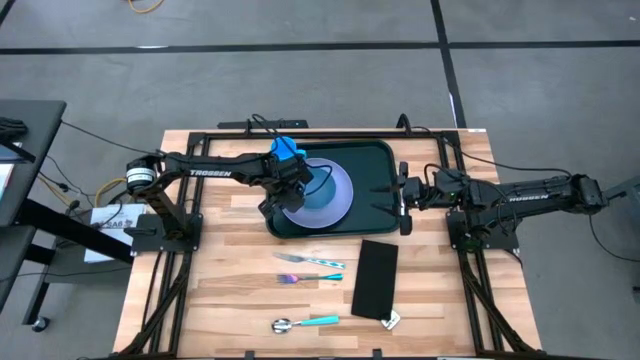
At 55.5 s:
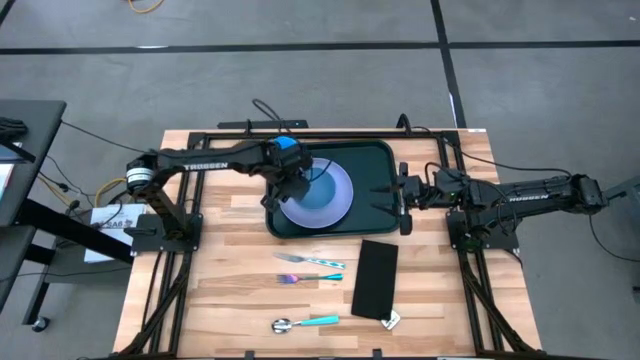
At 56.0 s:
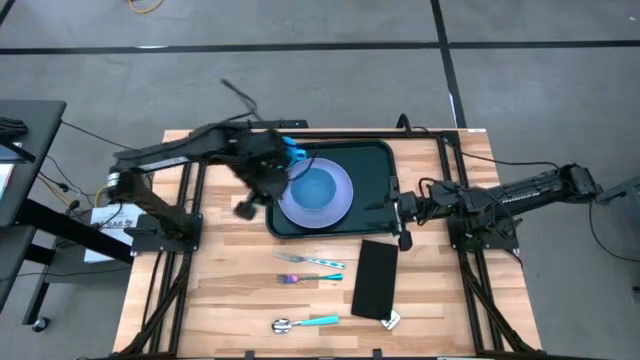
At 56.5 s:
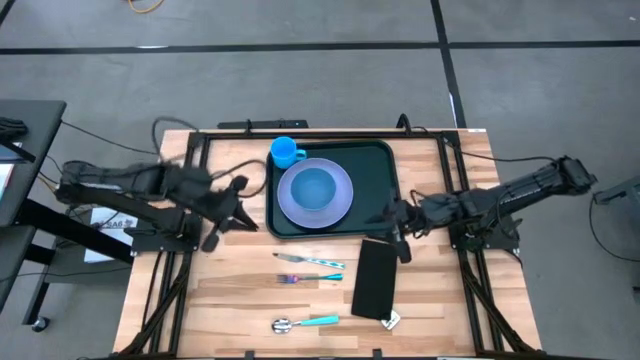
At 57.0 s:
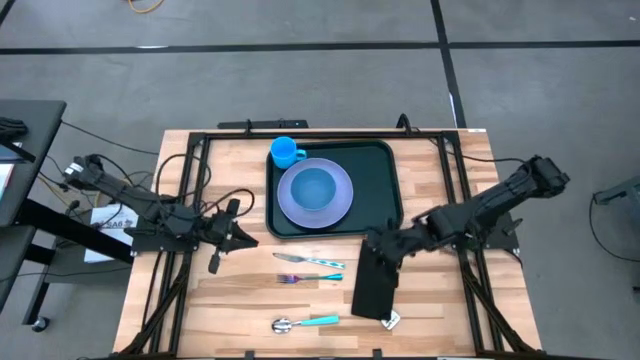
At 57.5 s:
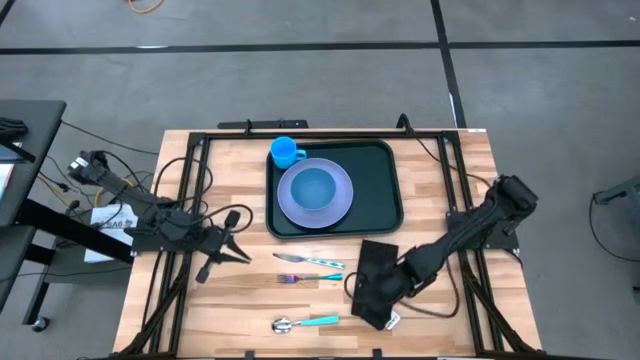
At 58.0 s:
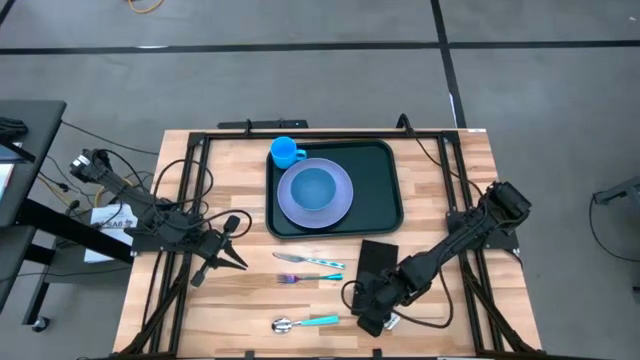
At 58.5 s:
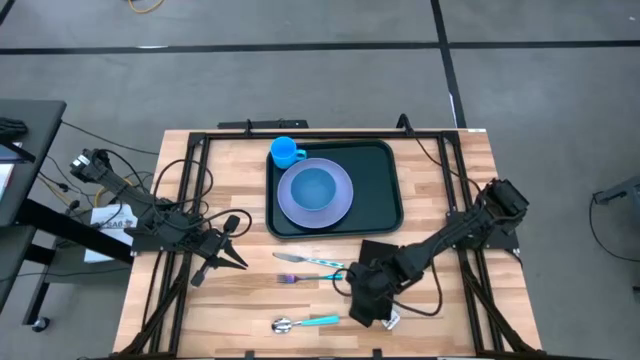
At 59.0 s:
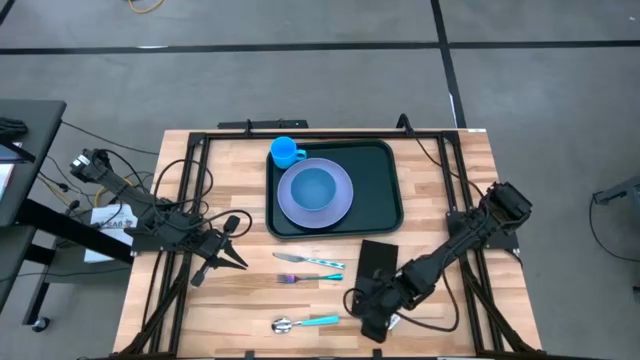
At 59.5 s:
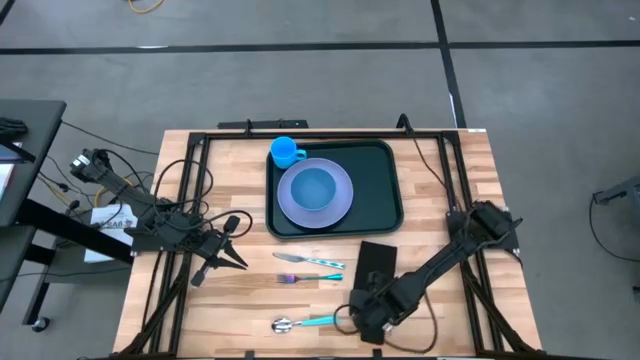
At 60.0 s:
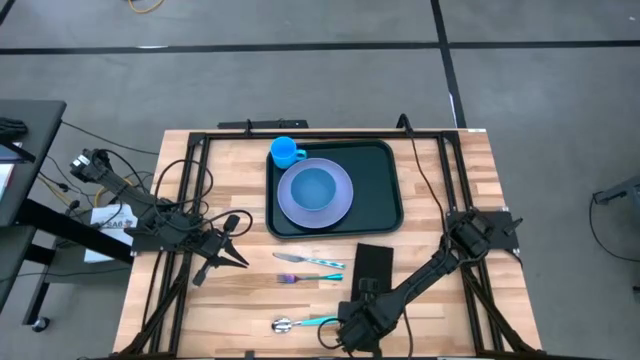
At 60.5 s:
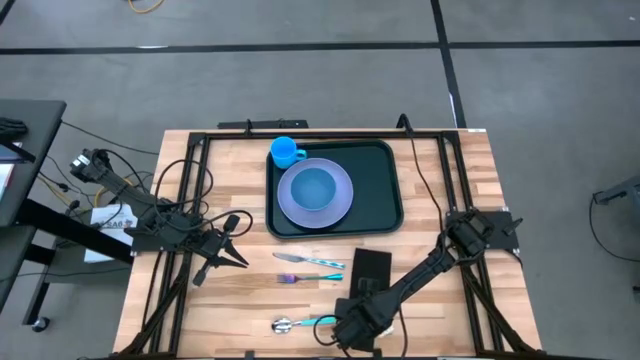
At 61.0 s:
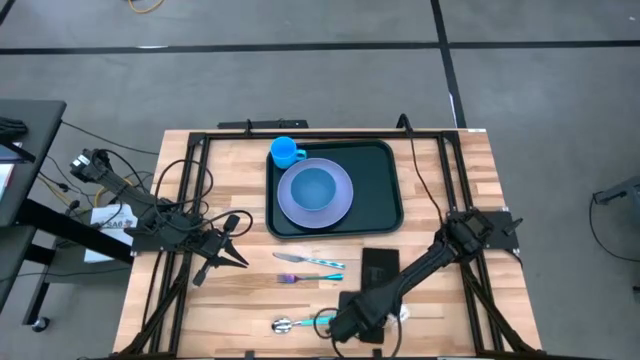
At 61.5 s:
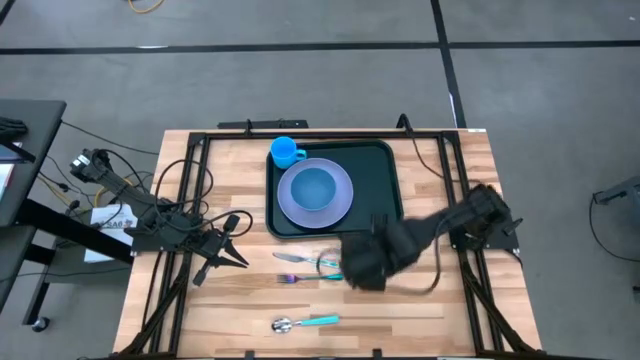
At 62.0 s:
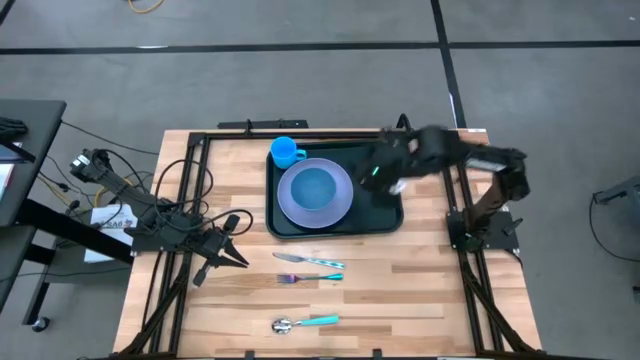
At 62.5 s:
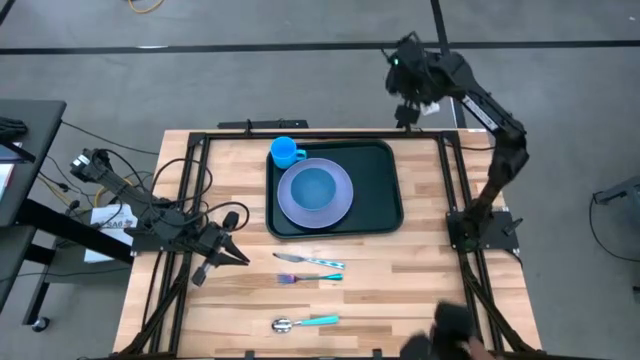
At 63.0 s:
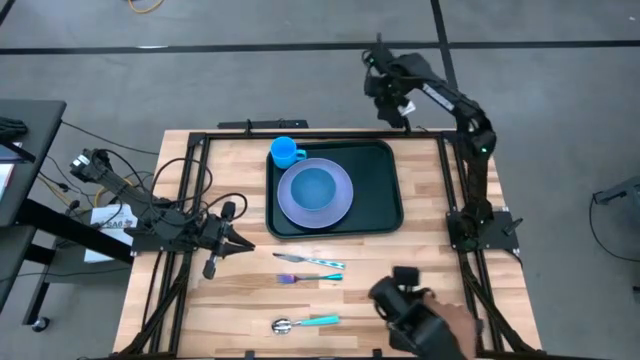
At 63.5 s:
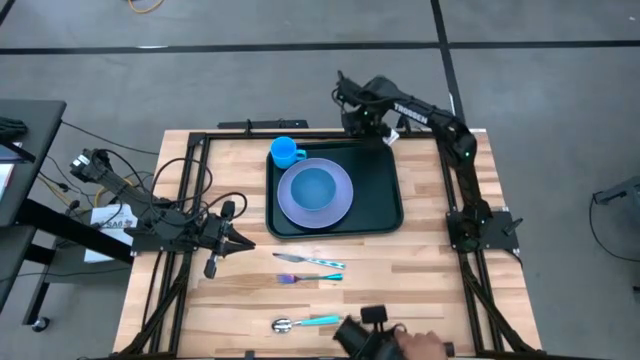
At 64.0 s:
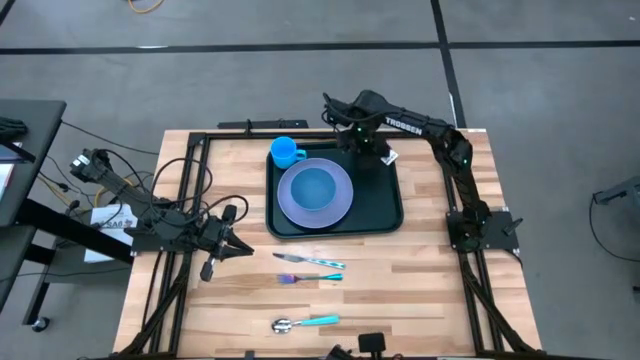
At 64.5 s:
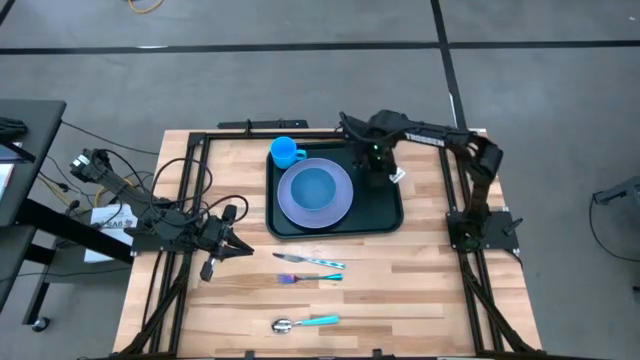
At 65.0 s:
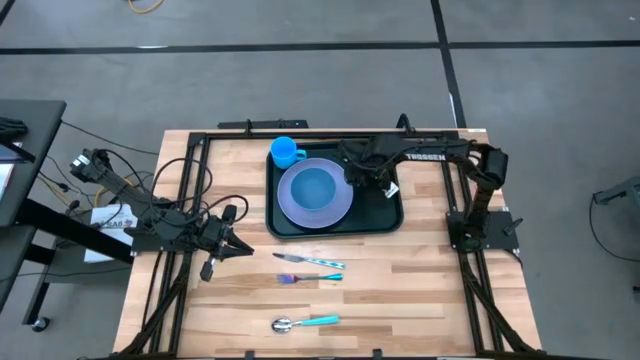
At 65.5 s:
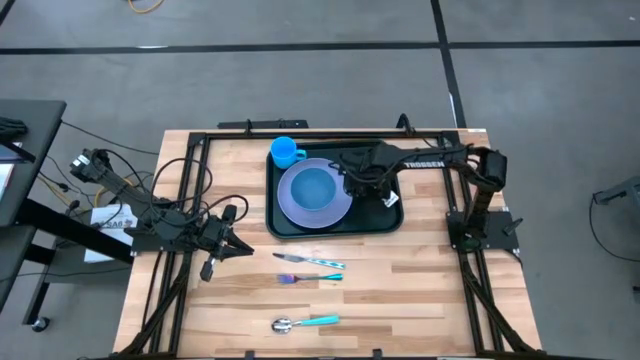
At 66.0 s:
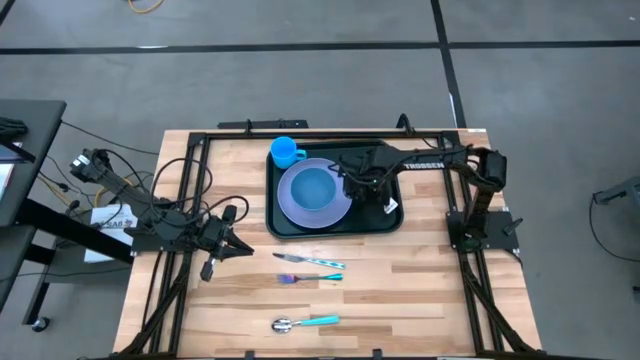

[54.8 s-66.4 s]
Task: Set up tray
Put the black napkin on the black tray

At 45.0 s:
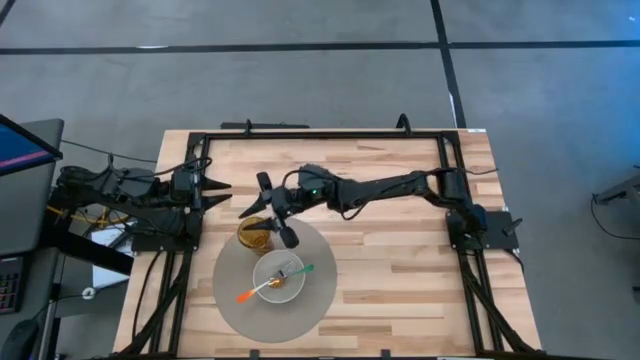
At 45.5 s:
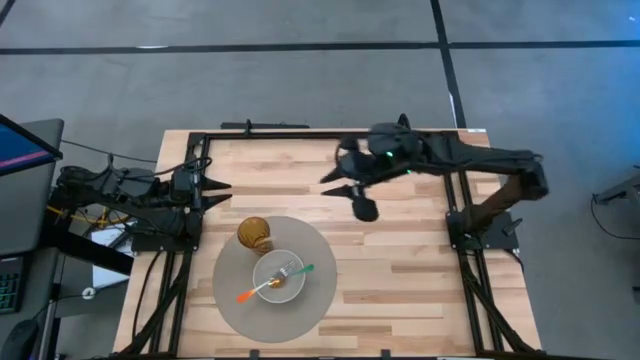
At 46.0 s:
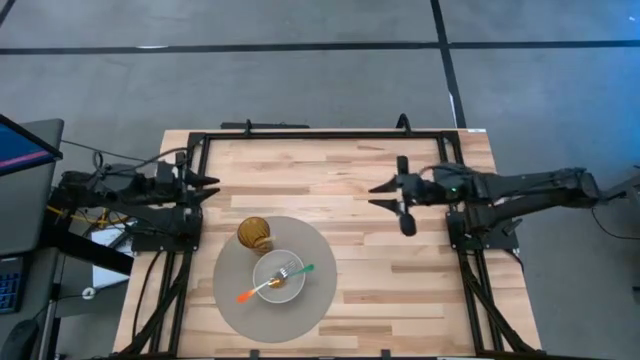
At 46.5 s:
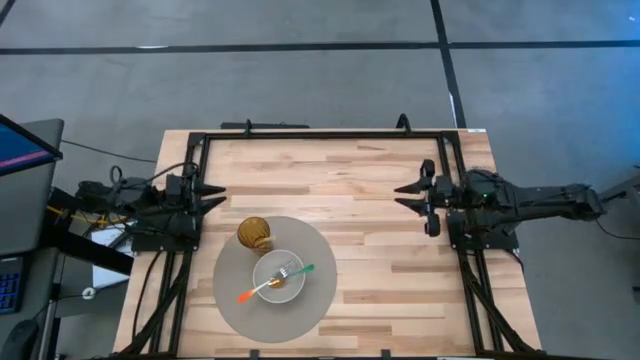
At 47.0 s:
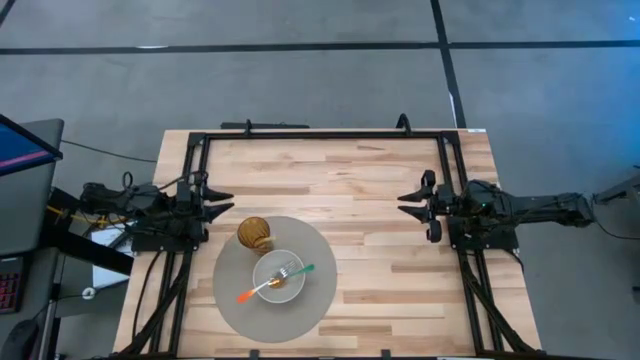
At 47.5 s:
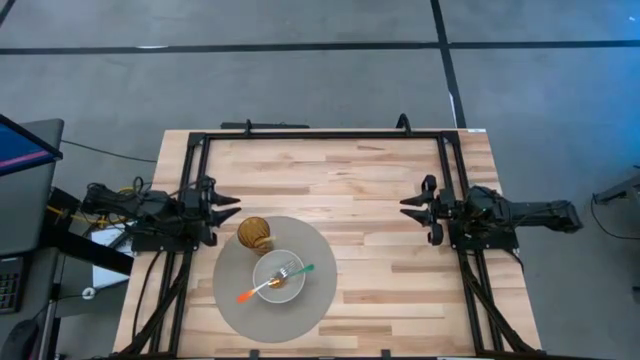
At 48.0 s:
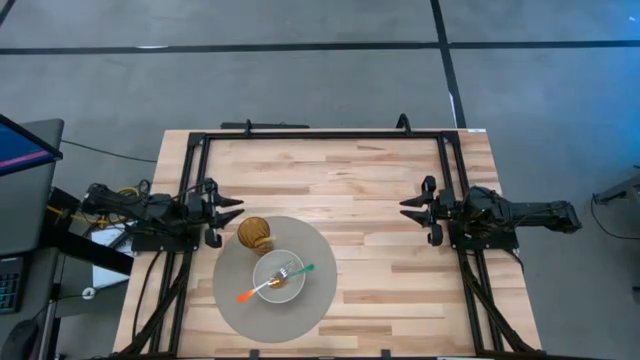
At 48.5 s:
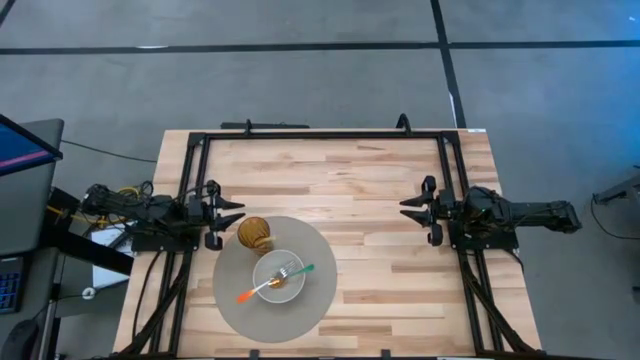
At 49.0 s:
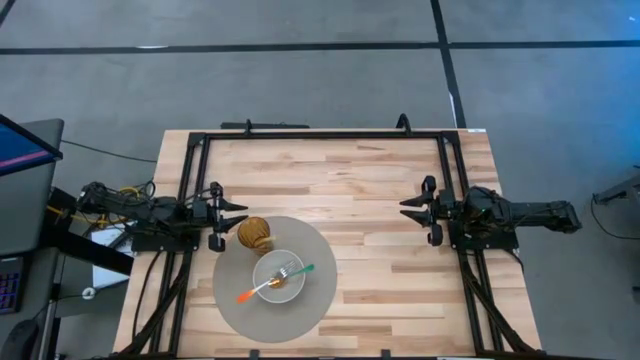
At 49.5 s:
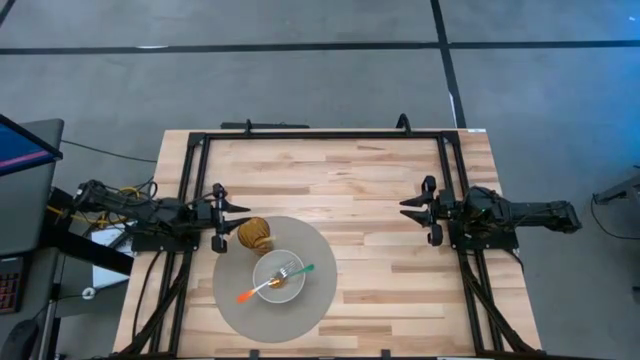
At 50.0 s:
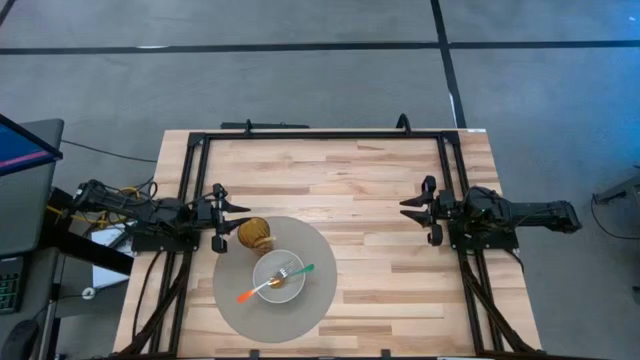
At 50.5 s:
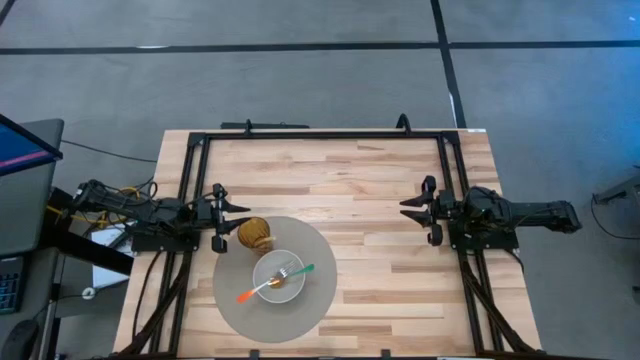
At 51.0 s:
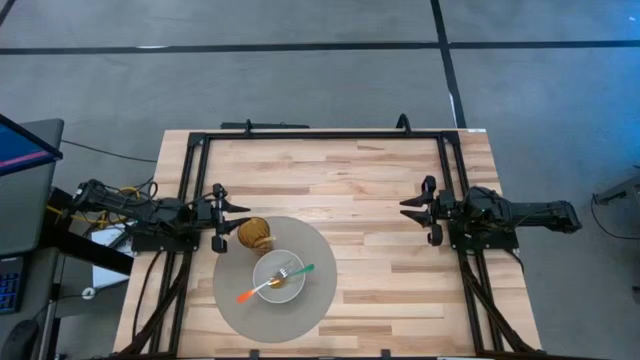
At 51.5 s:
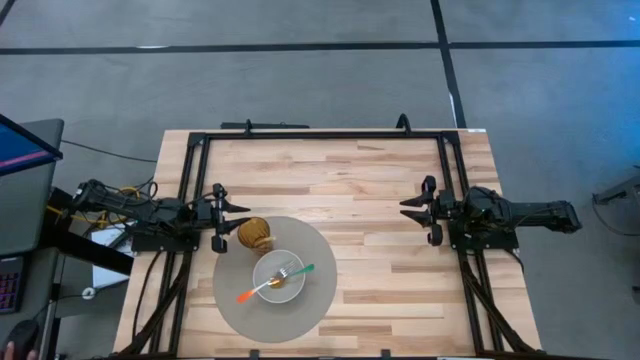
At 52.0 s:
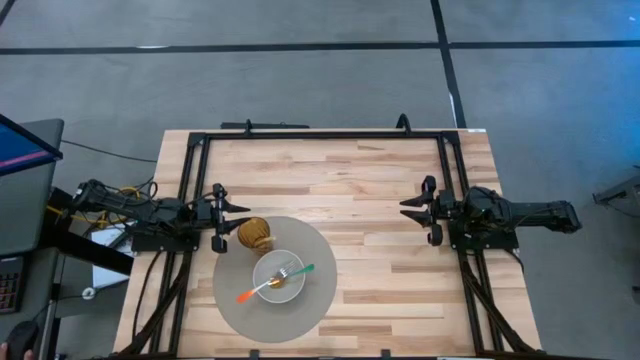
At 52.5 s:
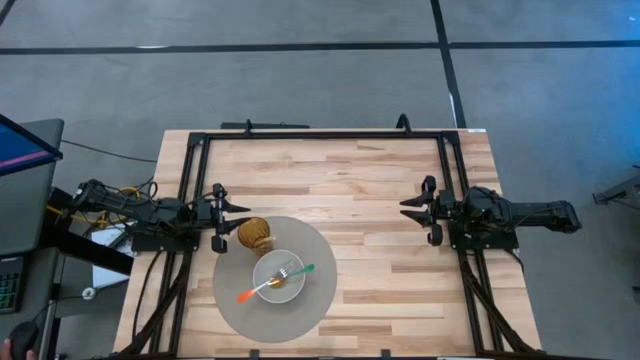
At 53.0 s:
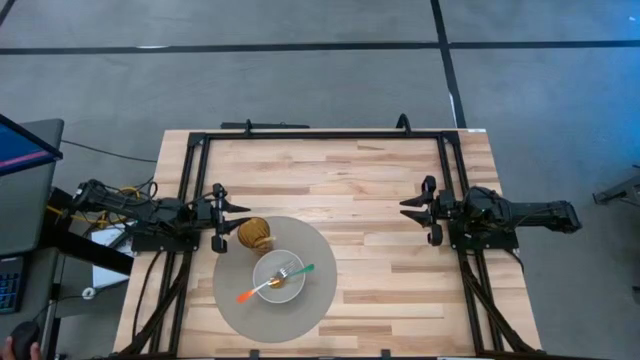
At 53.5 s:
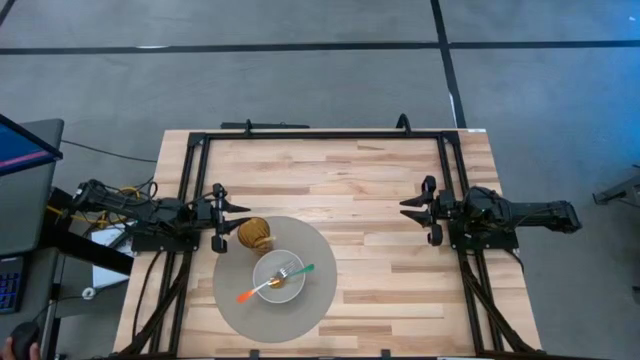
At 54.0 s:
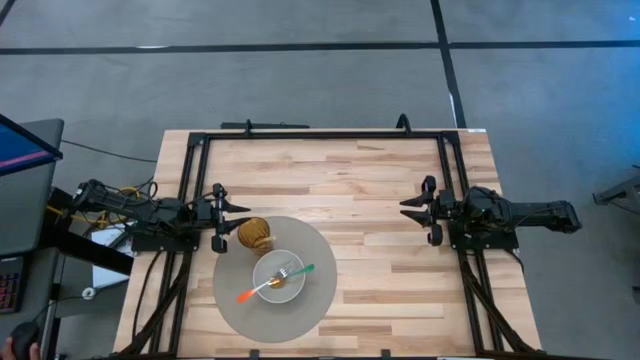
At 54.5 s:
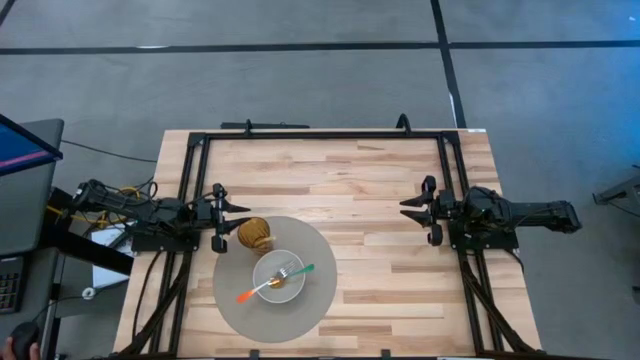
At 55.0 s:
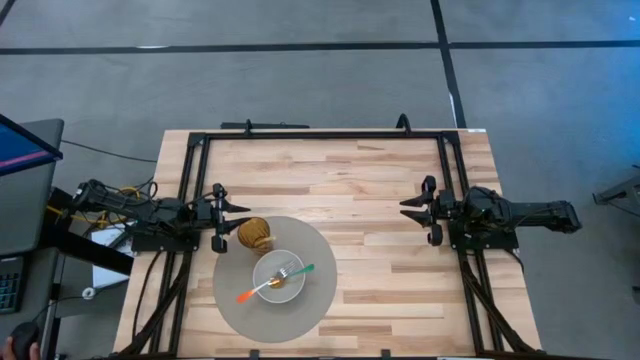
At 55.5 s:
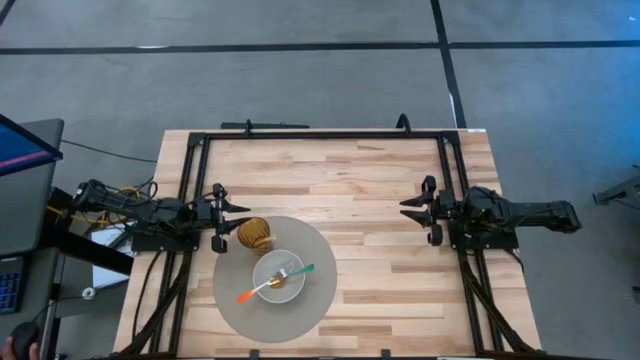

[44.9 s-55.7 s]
Task: Pick & Place Utensil
Return to Home Position
